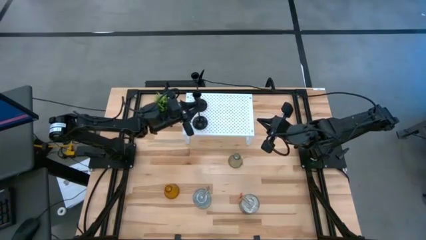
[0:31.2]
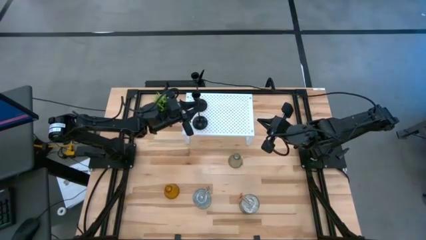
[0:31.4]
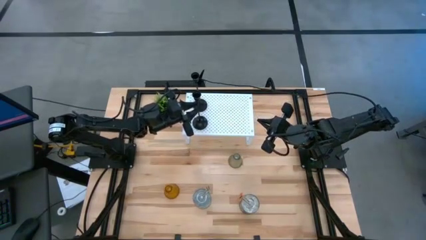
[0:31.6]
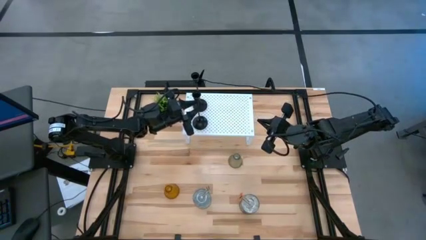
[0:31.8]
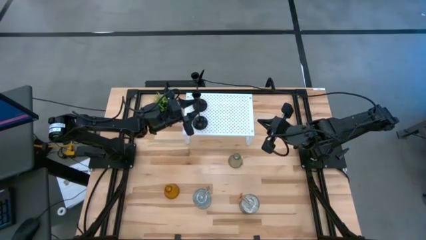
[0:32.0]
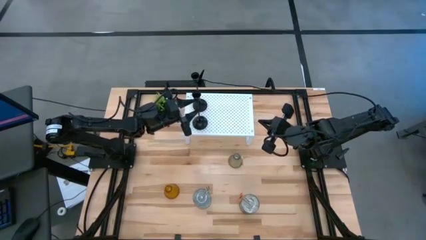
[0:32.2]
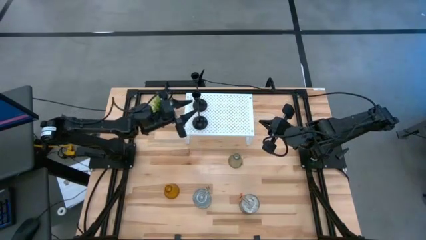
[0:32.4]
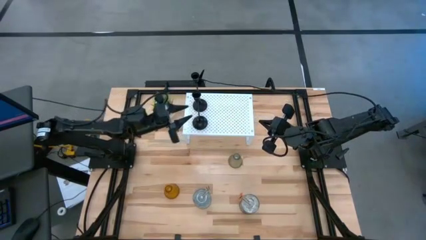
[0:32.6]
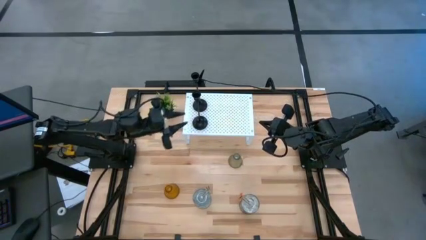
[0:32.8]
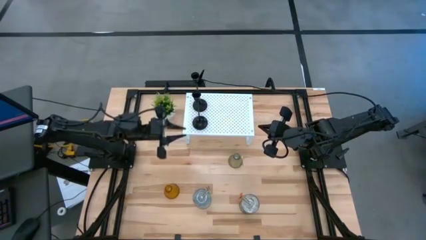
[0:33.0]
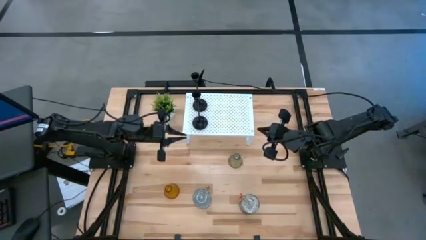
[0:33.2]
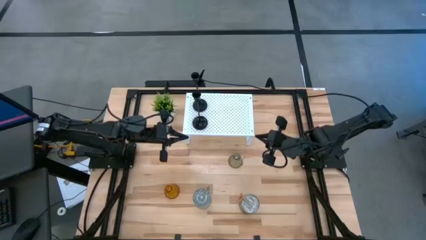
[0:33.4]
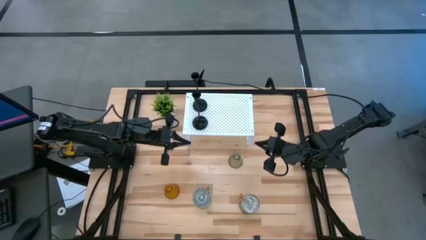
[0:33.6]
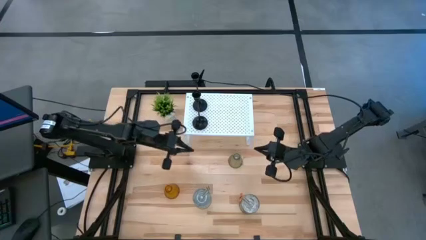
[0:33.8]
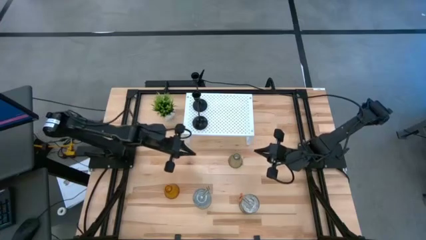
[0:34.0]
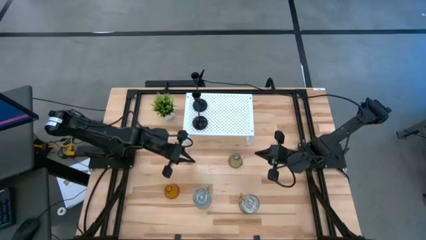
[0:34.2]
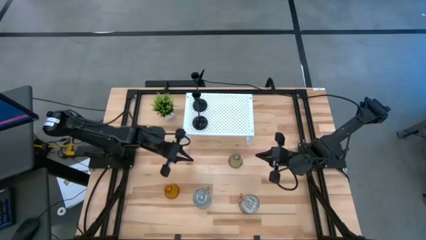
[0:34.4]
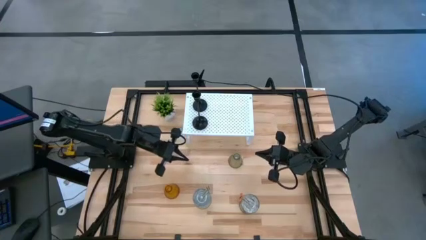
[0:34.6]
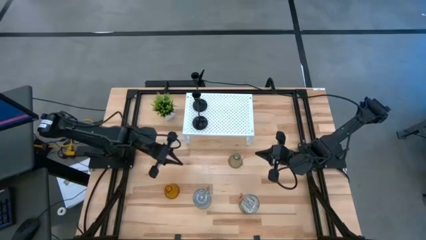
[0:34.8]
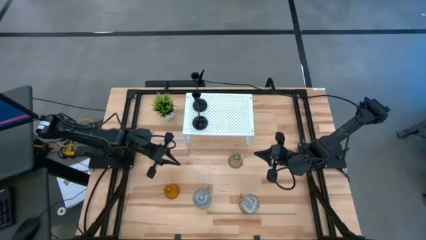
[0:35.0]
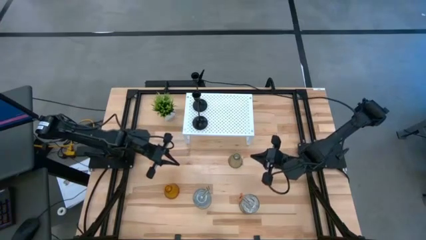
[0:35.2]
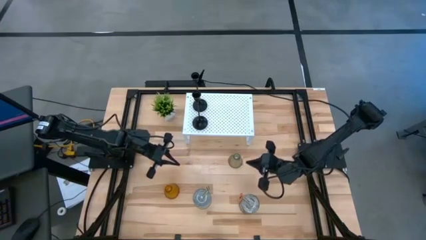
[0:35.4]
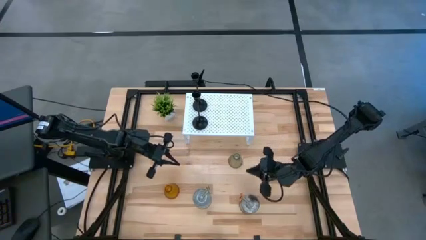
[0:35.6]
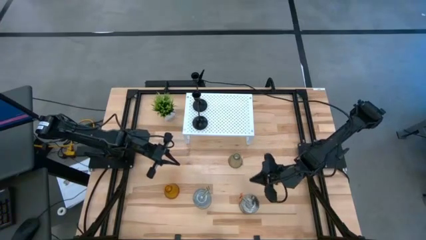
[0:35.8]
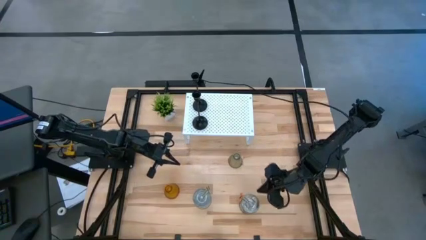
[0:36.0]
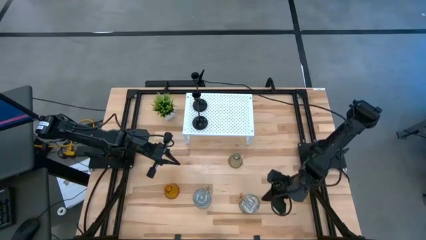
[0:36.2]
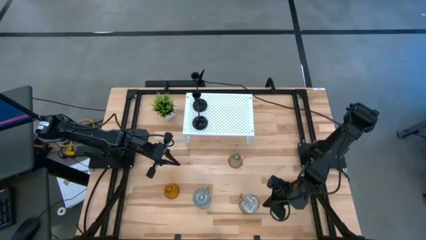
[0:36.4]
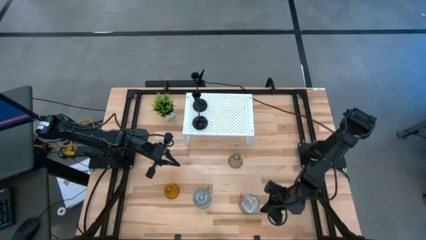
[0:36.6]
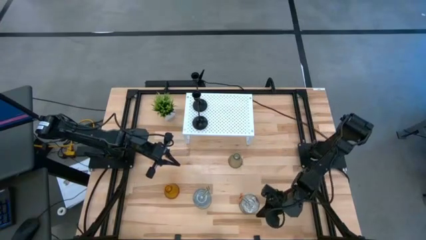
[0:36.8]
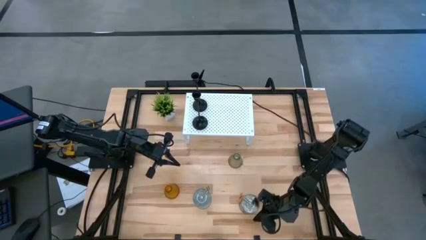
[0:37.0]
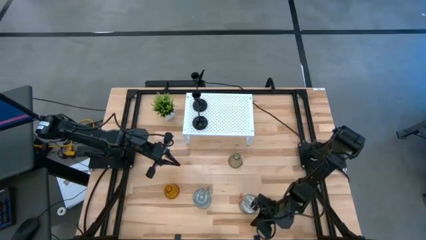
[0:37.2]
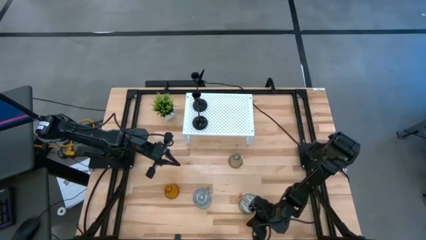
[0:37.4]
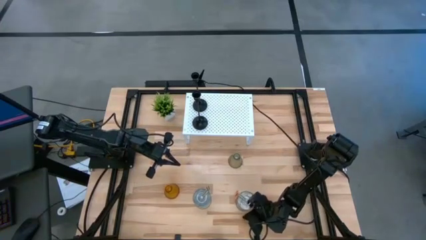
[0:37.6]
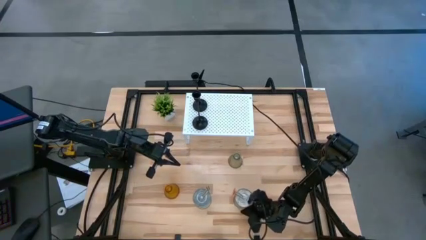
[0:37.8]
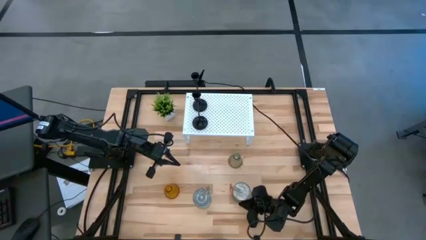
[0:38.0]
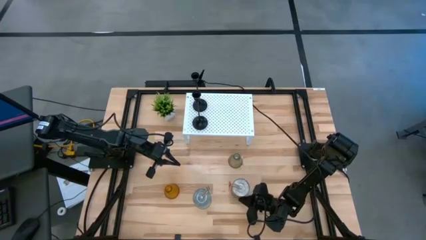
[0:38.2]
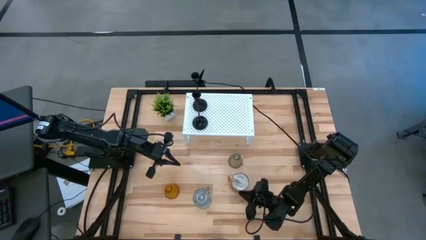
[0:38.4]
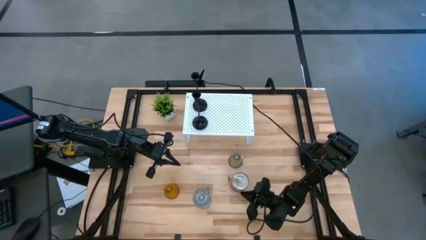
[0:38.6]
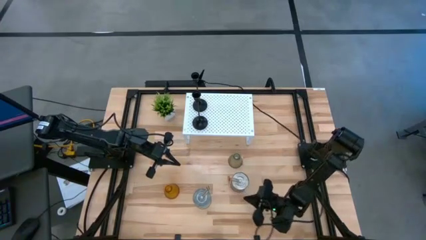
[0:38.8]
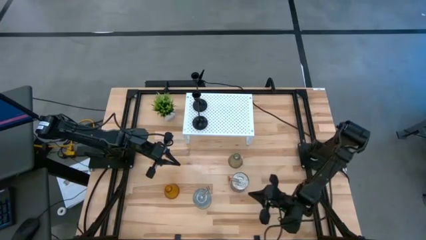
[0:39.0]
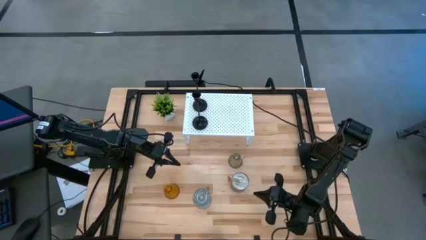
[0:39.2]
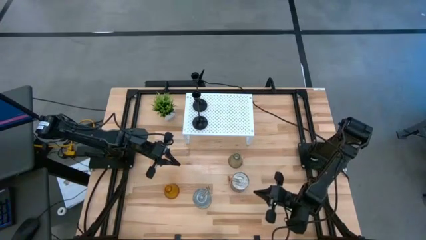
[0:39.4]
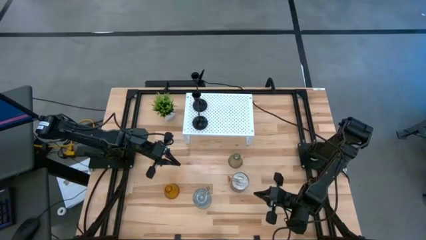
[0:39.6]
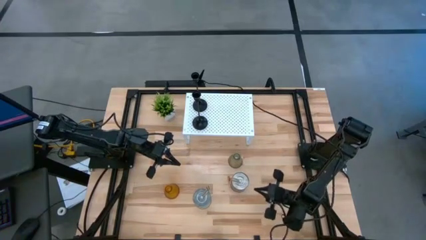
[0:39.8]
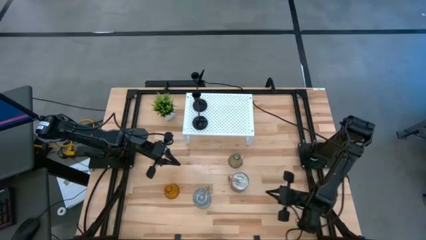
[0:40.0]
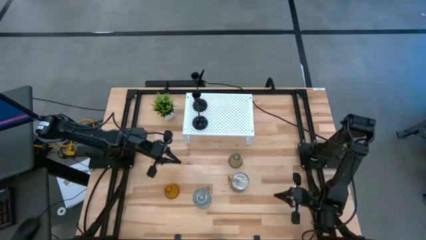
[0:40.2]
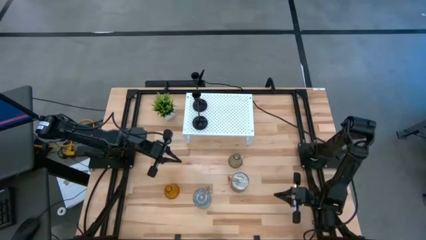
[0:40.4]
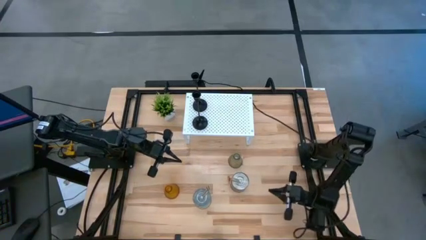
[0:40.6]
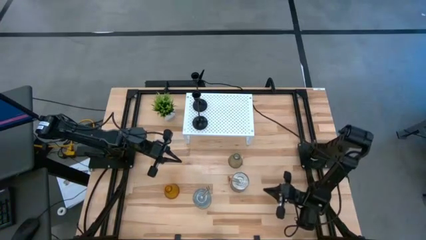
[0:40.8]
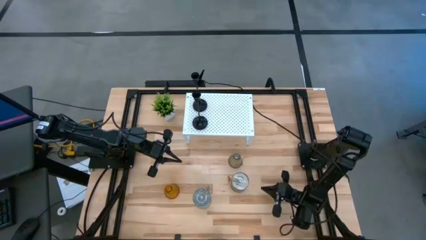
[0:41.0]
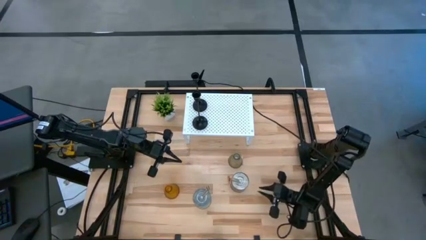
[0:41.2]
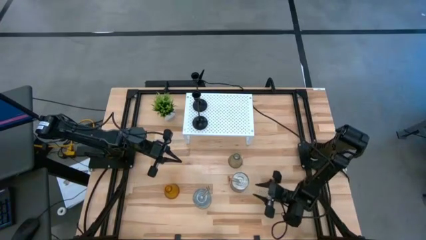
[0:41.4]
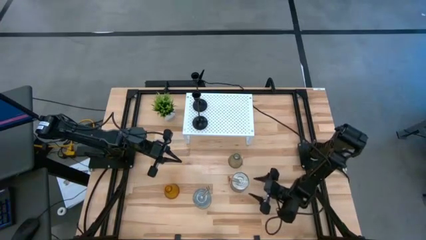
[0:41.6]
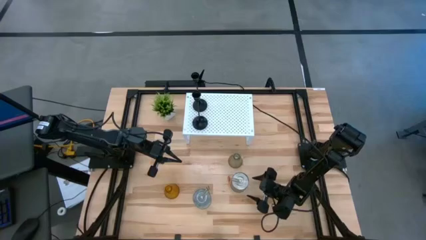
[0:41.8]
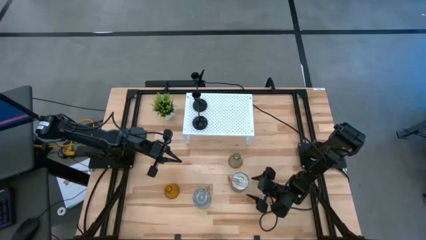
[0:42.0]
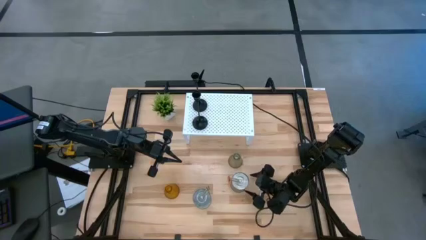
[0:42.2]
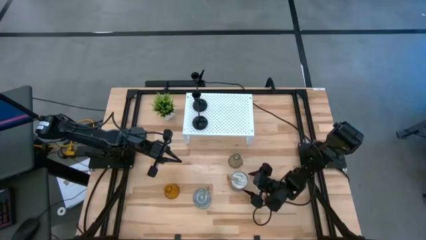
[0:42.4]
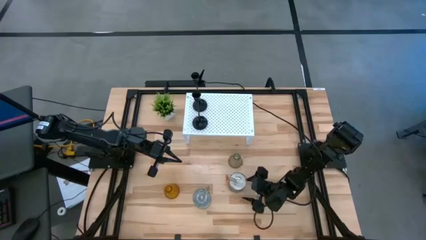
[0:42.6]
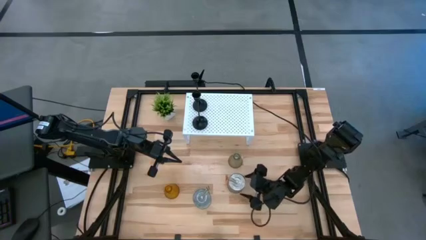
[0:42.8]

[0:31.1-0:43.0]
Task: Pick & Place candle stick holders
Put the right silver scented candle can on the shelf
